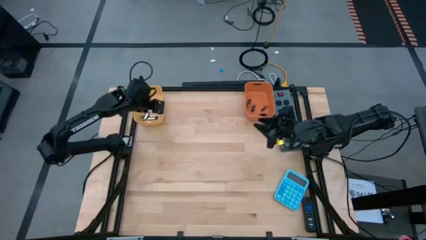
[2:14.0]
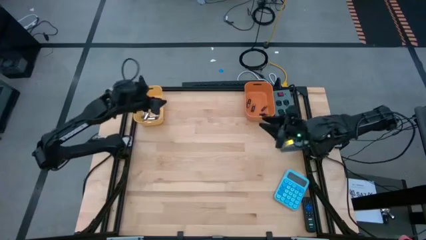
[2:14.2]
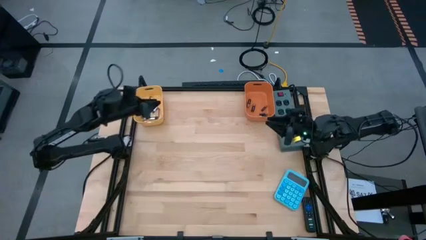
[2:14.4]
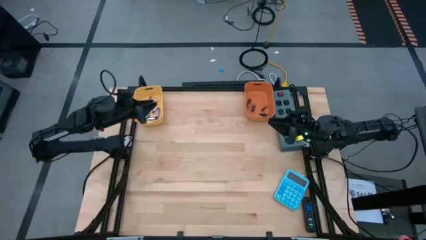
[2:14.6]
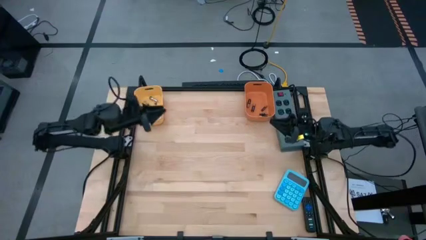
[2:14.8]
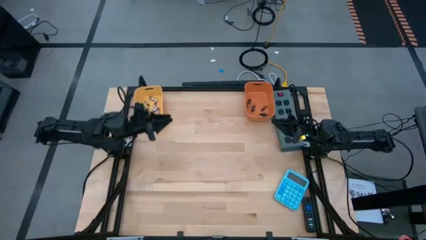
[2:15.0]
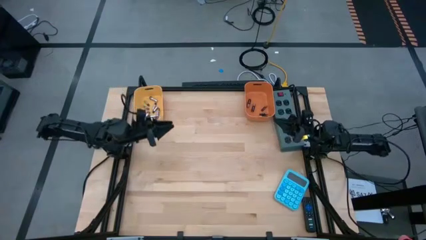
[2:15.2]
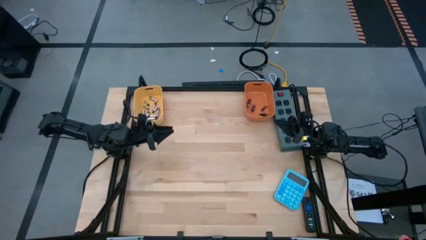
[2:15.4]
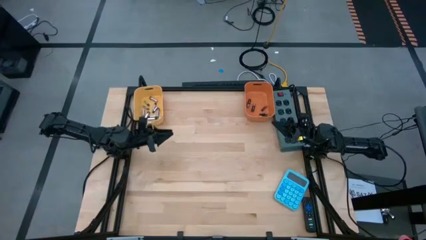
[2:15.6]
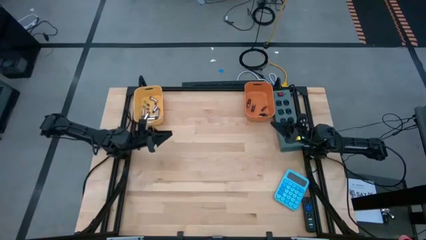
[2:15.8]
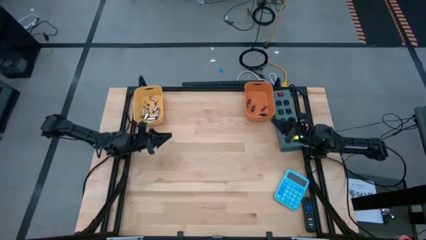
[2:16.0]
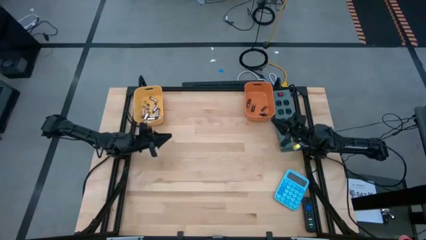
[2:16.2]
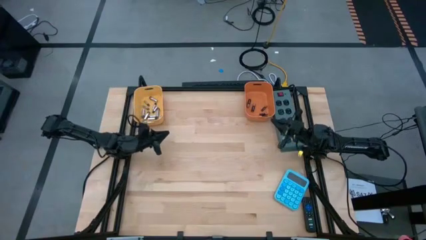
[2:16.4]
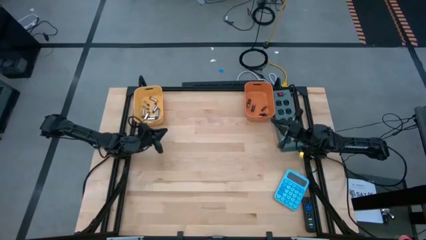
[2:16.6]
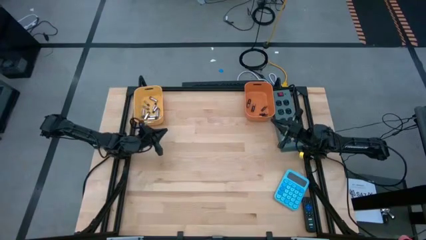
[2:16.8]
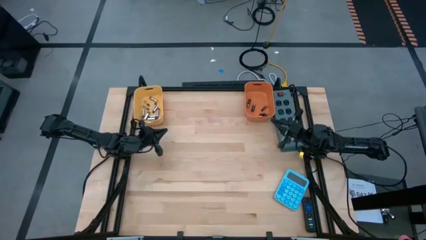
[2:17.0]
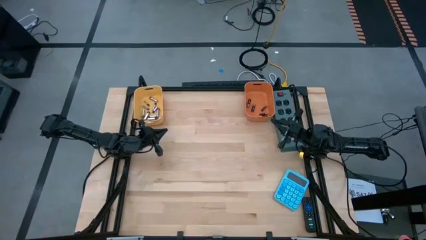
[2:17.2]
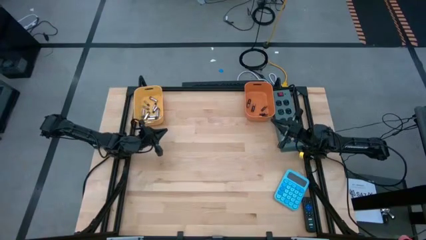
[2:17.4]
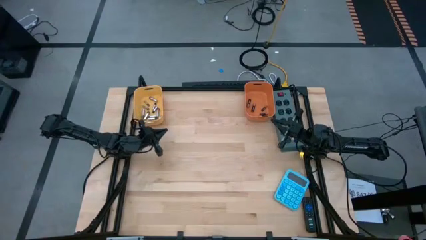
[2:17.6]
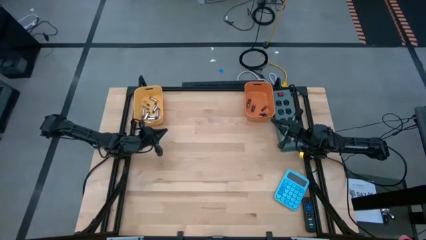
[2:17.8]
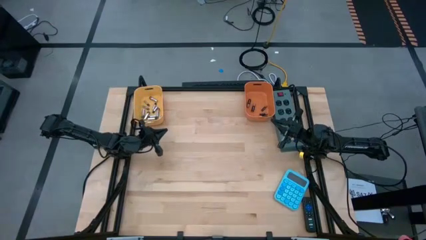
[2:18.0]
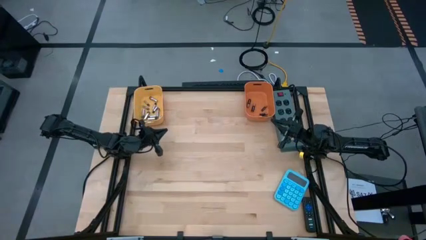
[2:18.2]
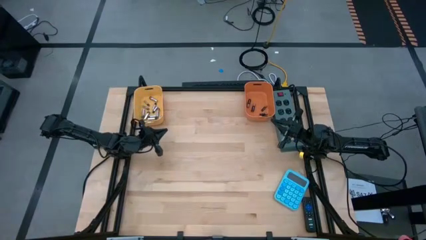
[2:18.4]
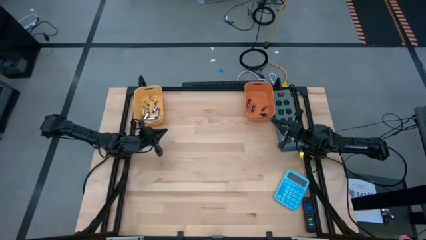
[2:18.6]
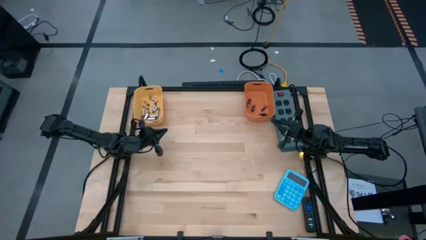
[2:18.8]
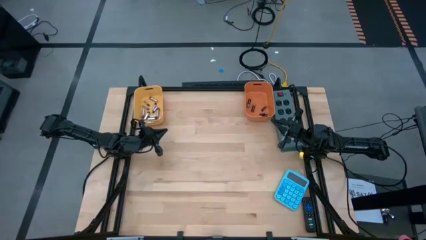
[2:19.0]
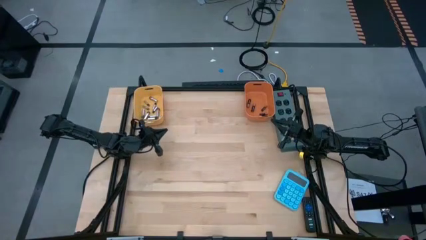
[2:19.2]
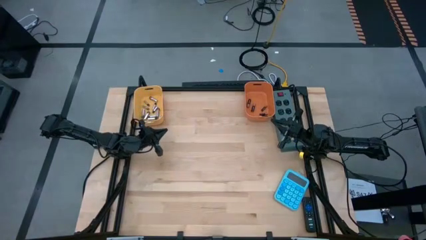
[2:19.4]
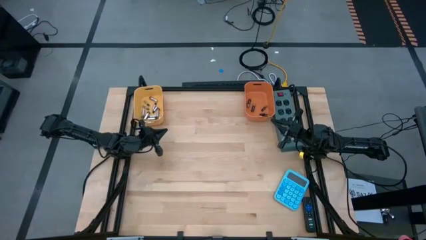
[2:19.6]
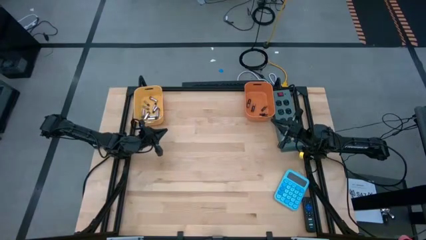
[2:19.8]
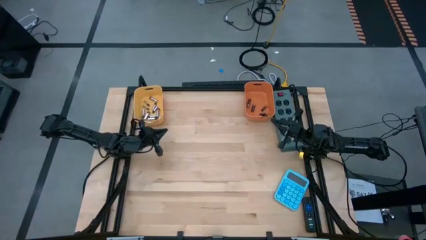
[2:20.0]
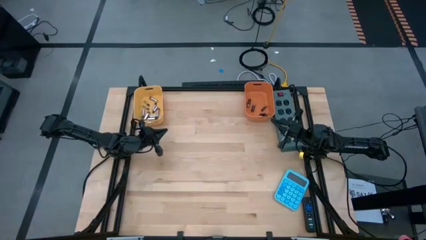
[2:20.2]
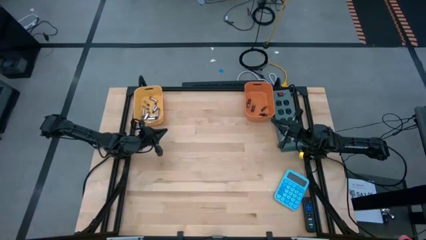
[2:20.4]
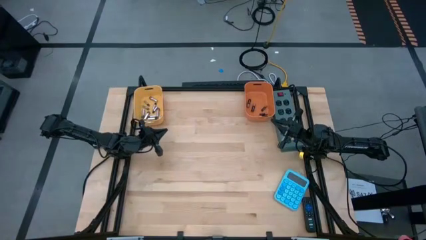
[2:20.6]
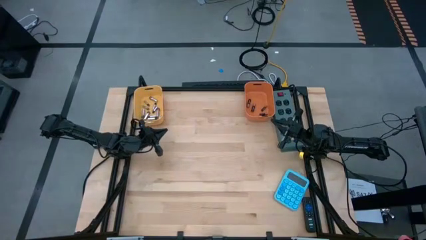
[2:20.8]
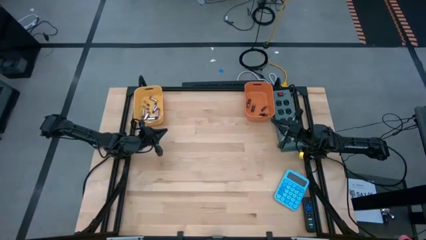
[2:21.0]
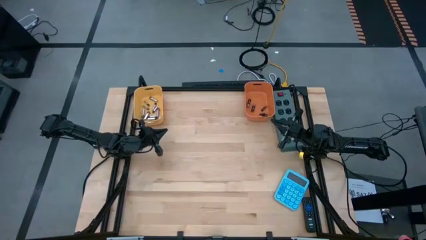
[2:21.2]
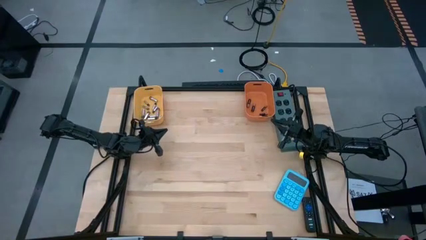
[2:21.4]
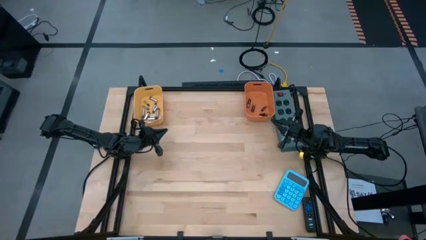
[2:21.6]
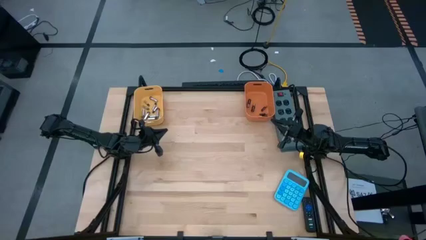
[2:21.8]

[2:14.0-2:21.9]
Task: Sort batteries
Return to Home Position

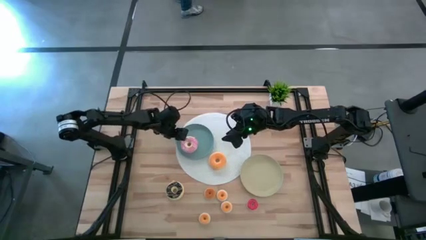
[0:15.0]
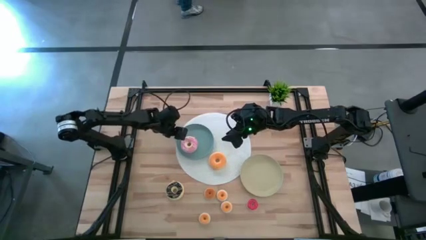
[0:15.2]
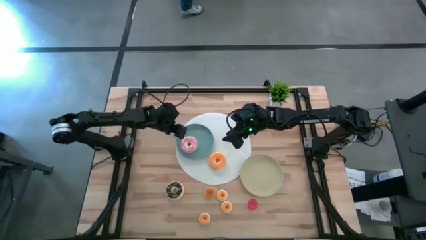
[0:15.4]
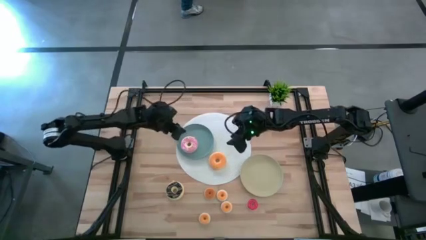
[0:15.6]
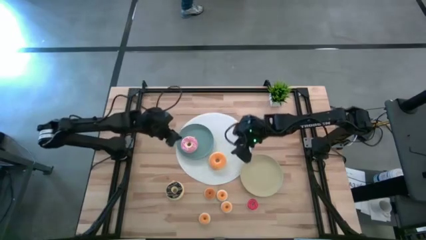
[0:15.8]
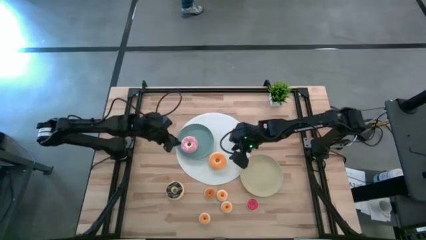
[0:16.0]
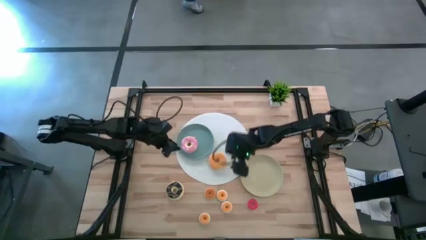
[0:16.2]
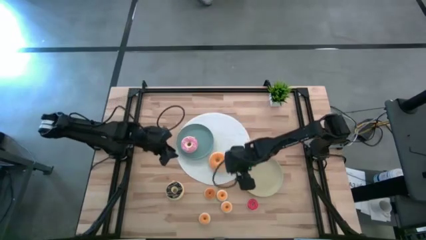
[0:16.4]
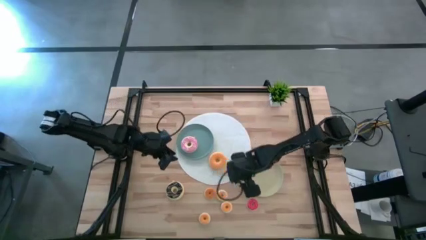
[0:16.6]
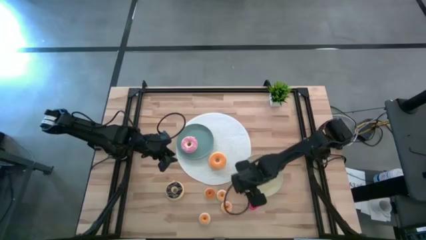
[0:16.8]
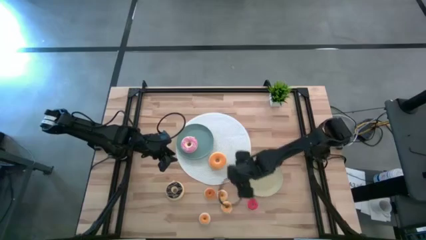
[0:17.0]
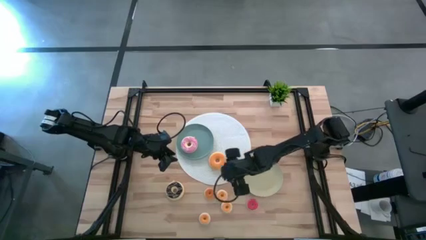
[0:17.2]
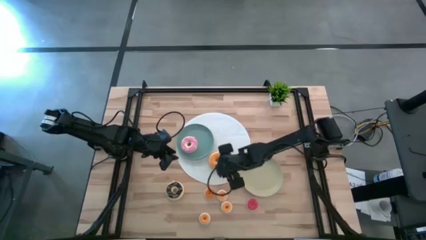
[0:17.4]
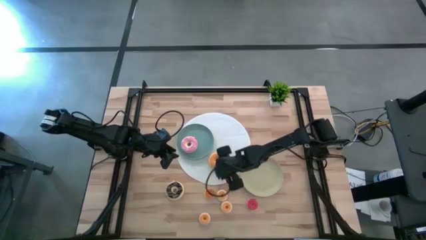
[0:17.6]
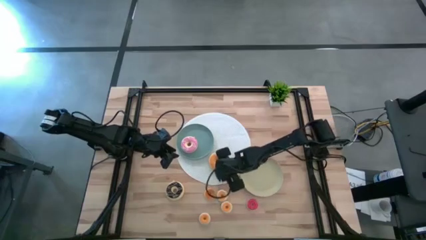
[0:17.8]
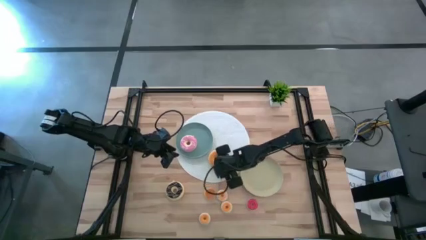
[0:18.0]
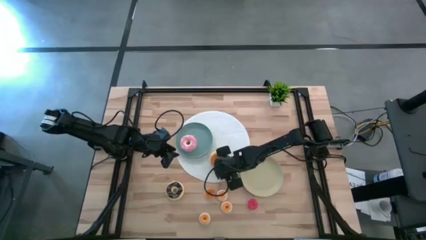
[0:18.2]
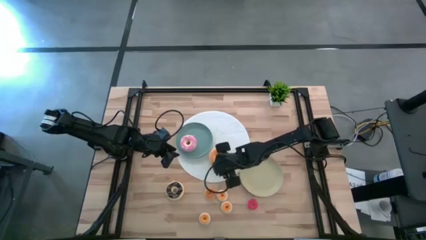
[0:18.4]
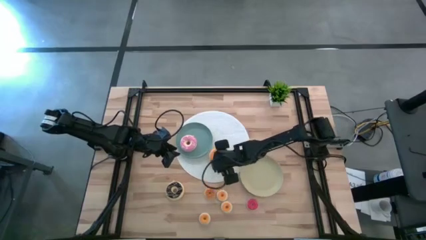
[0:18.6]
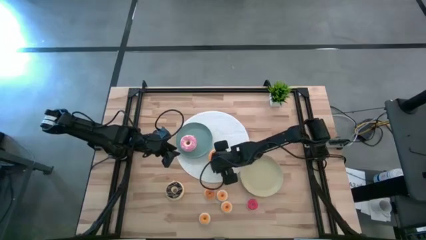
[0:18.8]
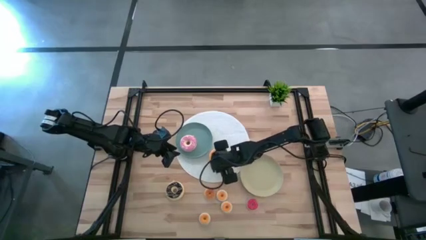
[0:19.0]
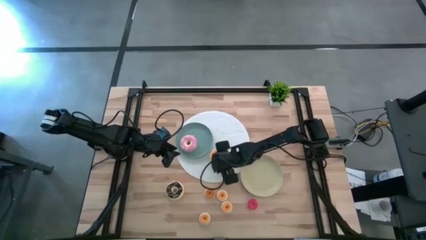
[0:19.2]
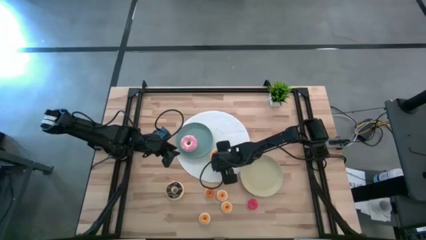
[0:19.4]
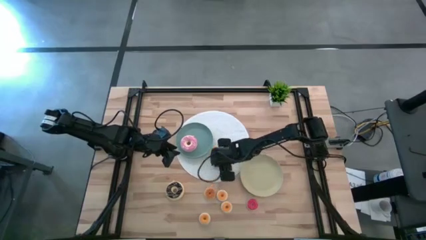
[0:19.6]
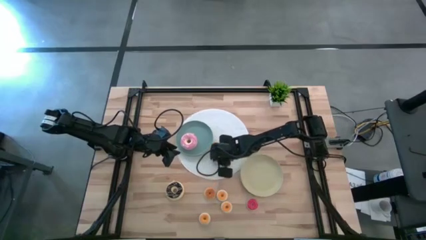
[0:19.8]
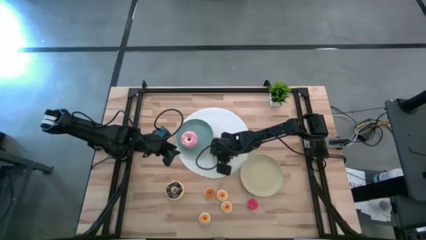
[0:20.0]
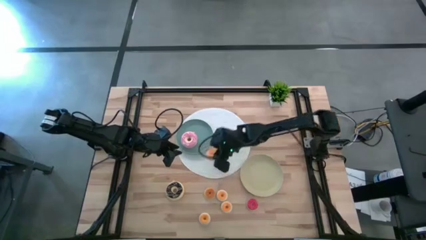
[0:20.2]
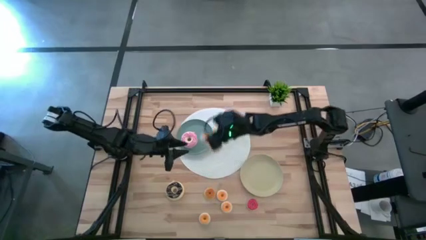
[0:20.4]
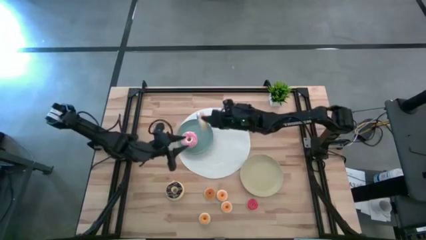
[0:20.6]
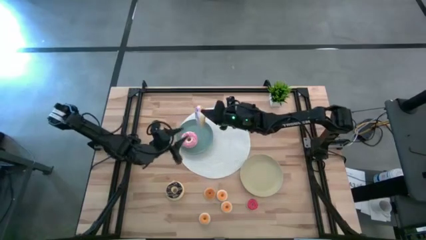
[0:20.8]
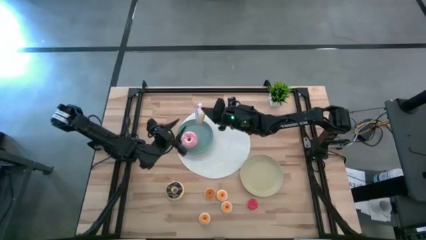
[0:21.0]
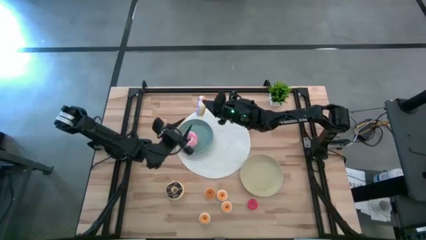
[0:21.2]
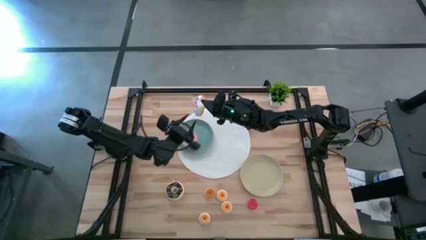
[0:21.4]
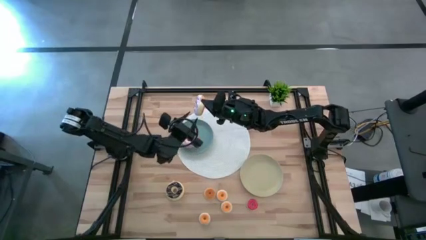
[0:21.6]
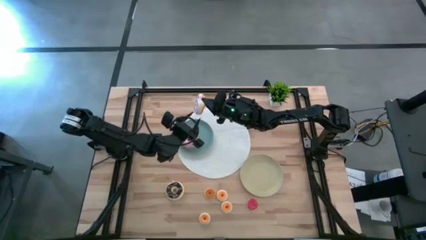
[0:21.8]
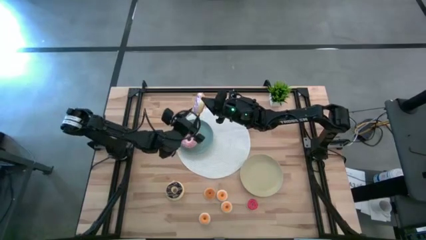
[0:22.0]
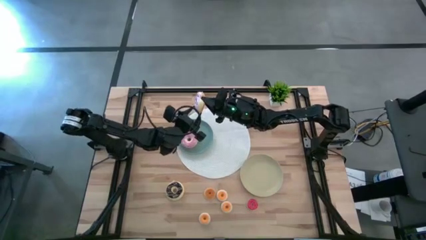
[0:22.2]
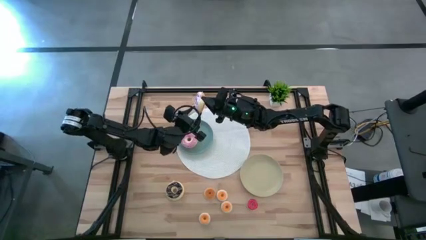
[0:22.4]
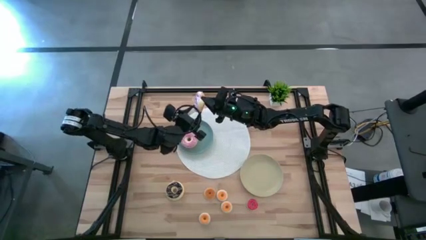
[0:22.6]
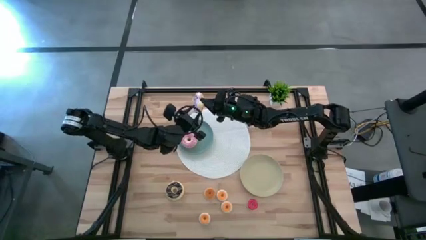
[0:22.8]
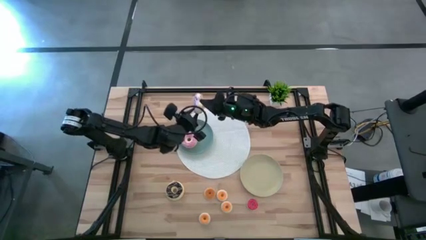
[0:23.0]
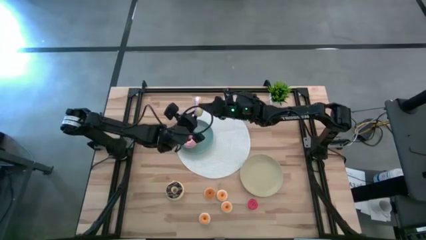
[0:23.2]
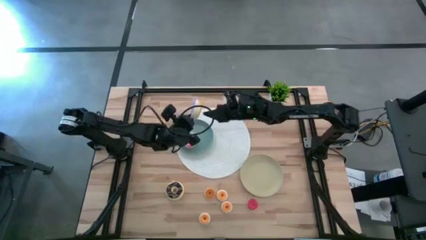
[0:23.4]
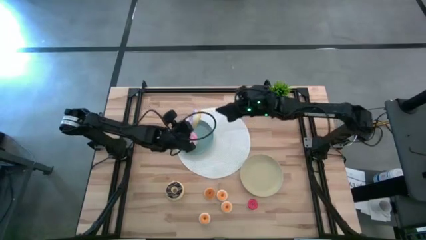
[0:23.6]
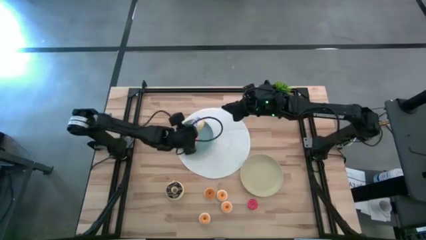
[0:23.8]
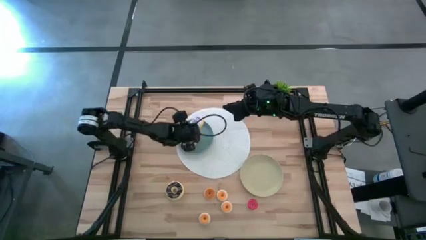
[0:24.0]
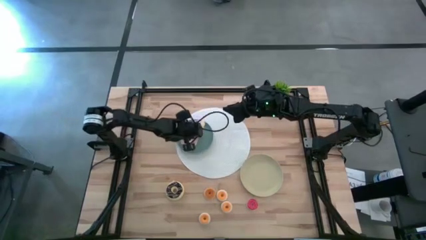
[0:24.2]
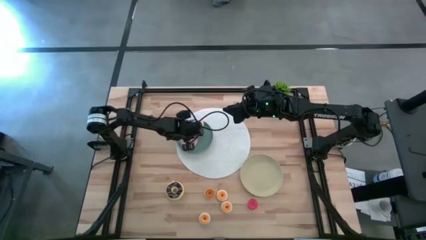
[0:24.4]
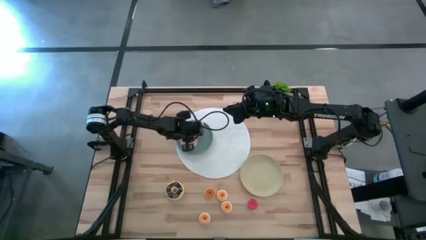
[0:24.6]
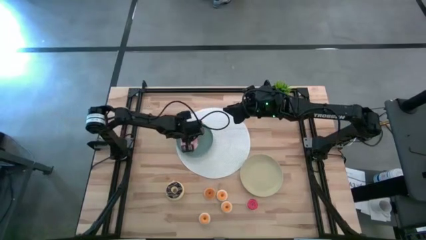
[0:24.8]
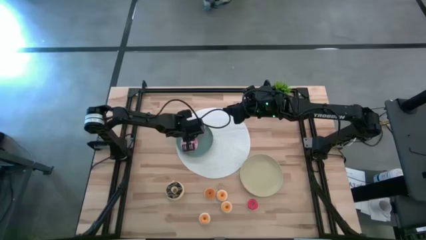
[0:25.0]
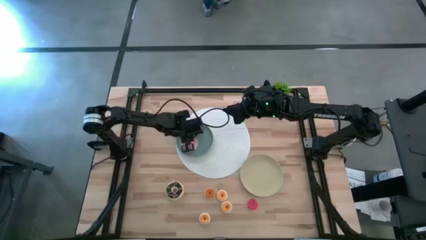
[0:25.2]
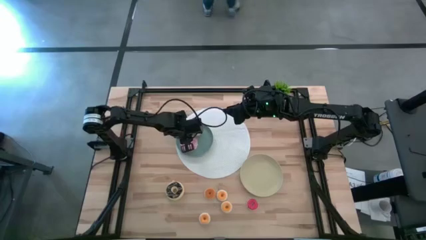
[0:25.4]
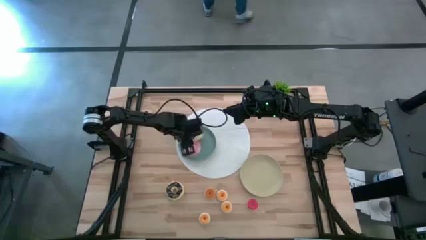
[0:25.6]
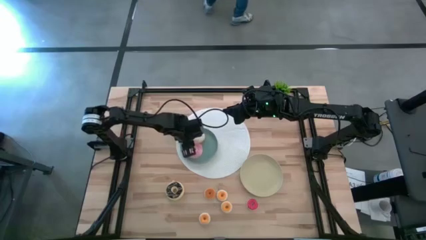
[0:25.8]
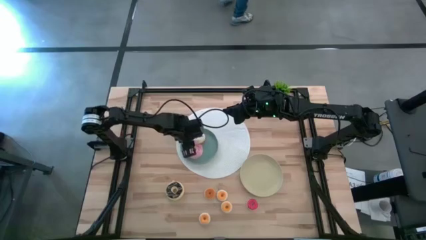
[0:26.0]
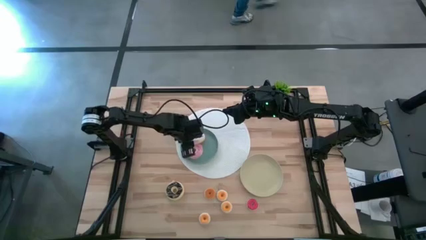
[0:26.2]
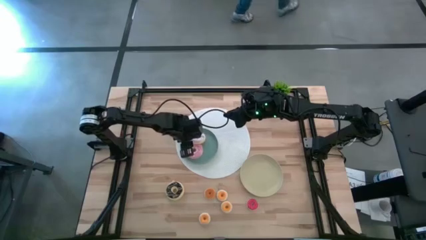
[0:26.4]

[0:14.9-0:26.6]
Task: Pick & Place donuts
Put the big purple donut on the blue plate
